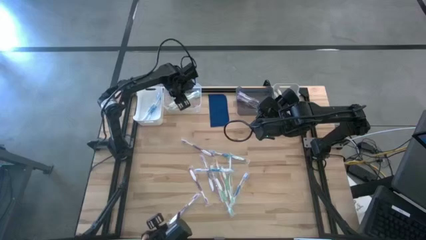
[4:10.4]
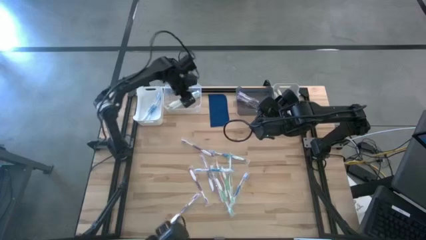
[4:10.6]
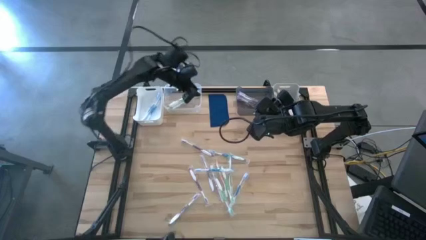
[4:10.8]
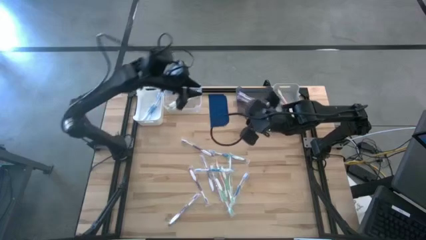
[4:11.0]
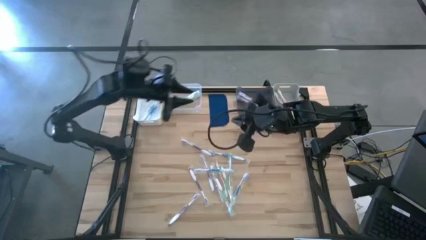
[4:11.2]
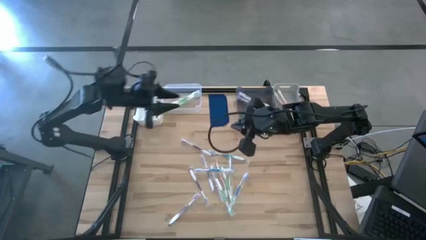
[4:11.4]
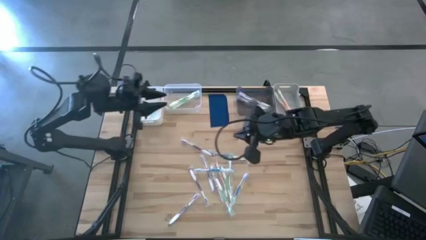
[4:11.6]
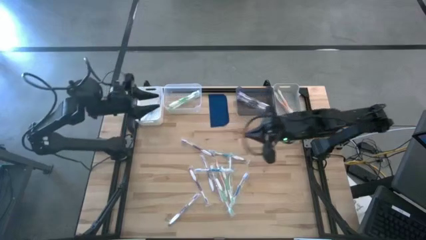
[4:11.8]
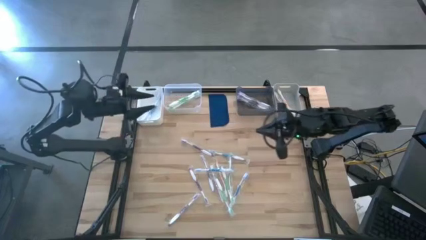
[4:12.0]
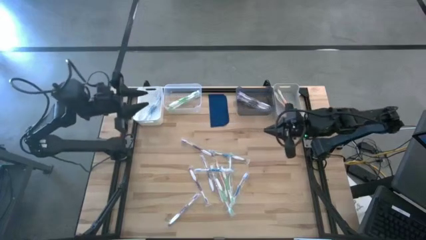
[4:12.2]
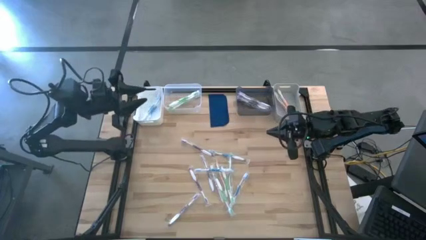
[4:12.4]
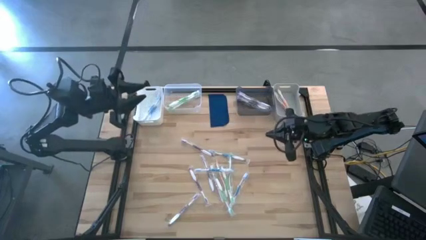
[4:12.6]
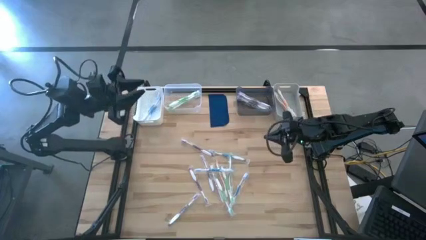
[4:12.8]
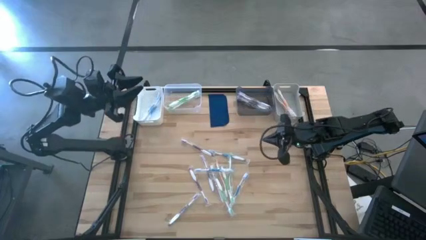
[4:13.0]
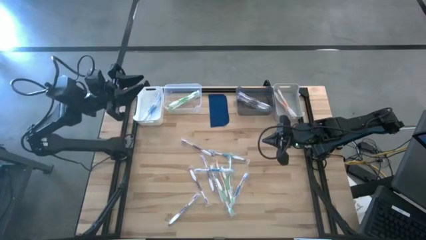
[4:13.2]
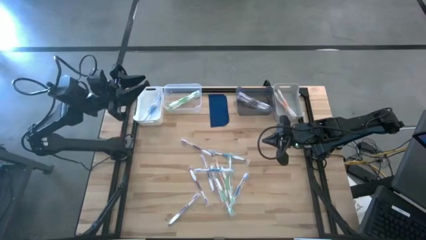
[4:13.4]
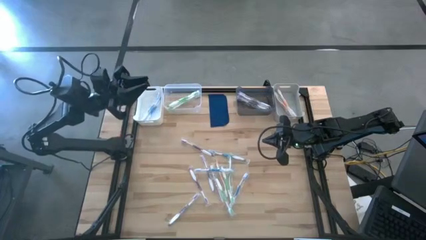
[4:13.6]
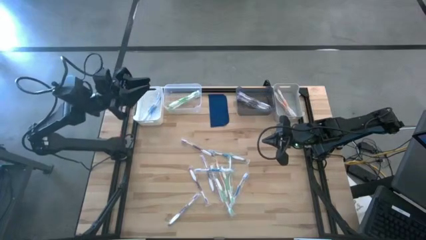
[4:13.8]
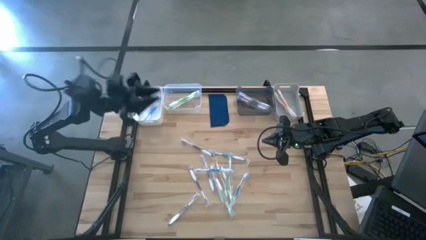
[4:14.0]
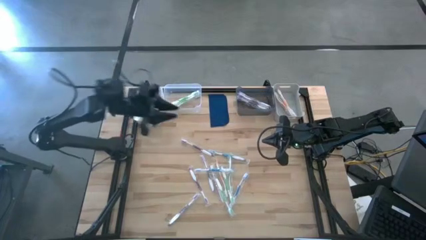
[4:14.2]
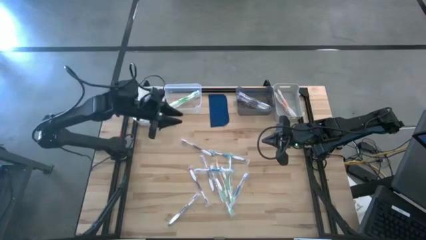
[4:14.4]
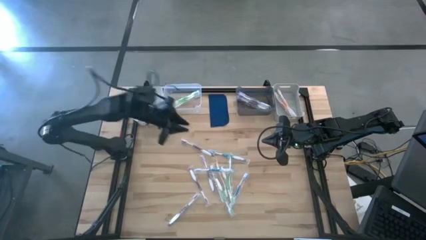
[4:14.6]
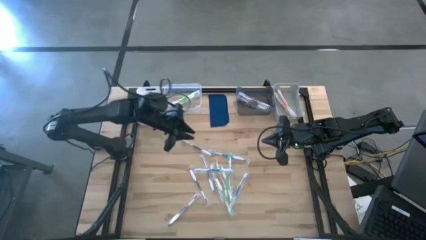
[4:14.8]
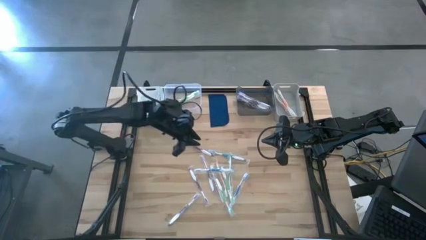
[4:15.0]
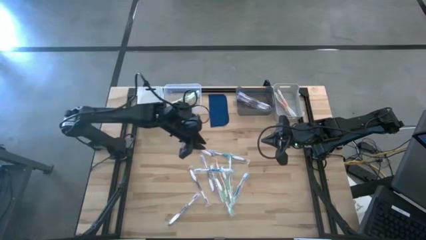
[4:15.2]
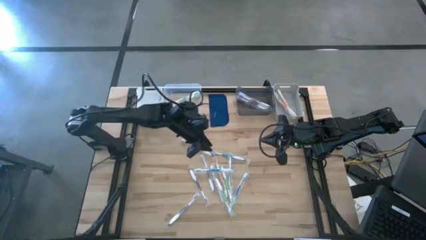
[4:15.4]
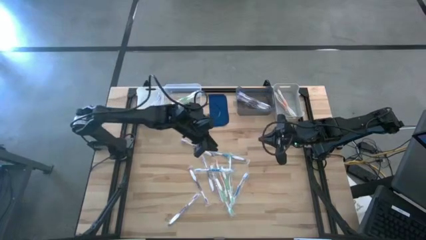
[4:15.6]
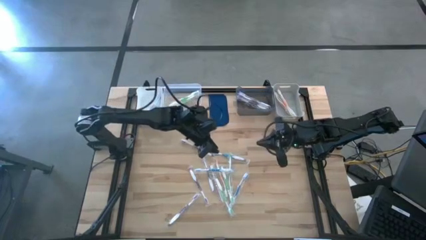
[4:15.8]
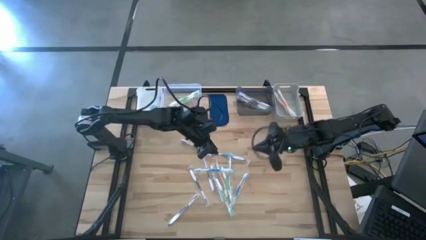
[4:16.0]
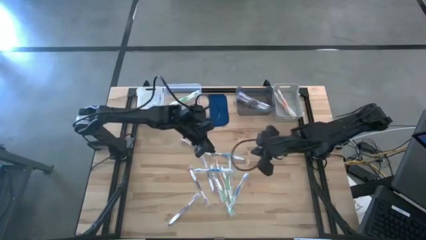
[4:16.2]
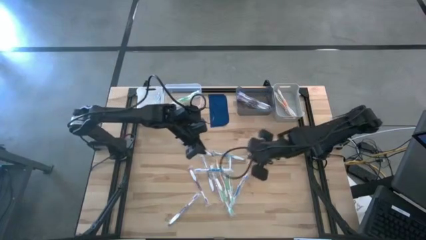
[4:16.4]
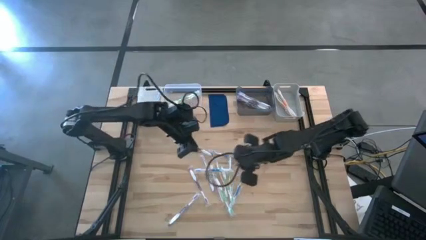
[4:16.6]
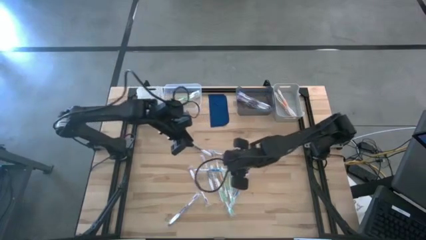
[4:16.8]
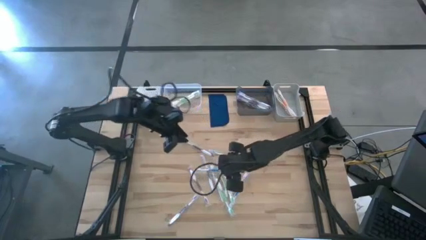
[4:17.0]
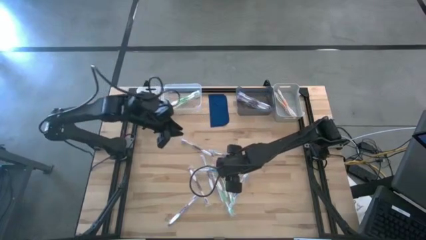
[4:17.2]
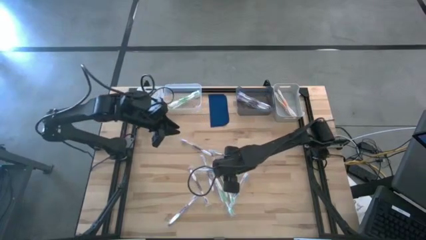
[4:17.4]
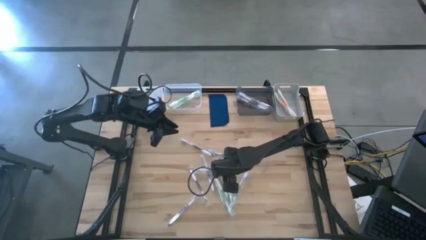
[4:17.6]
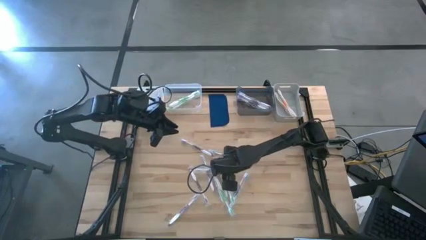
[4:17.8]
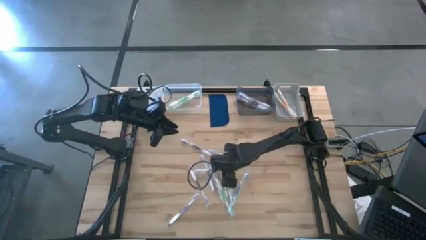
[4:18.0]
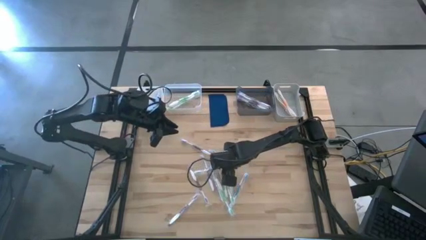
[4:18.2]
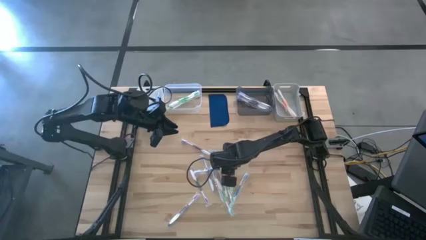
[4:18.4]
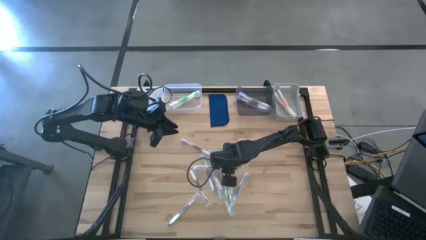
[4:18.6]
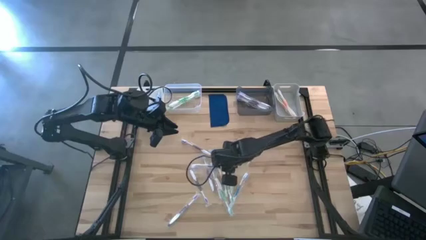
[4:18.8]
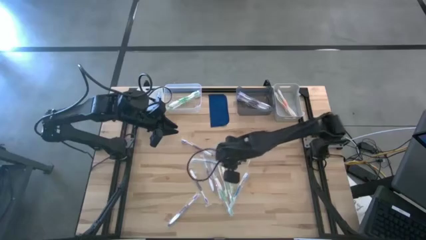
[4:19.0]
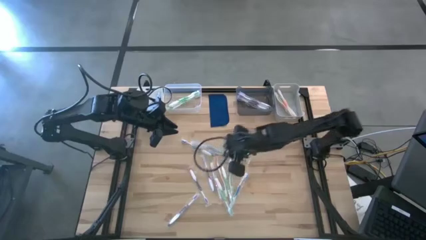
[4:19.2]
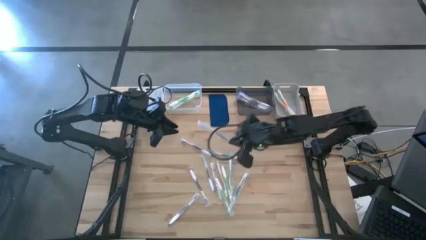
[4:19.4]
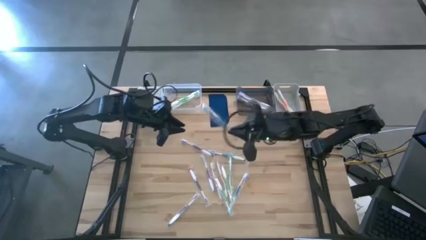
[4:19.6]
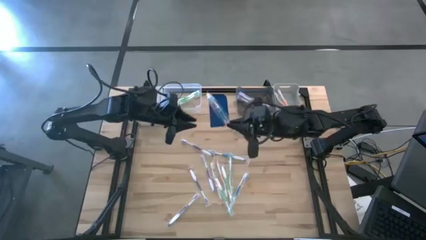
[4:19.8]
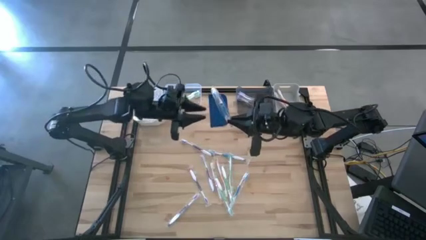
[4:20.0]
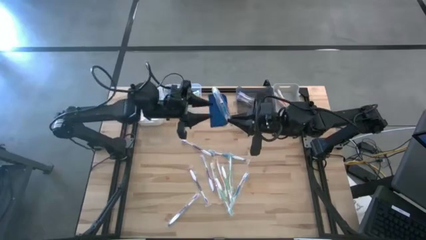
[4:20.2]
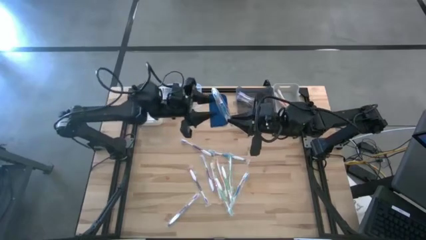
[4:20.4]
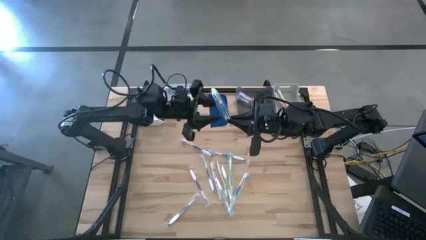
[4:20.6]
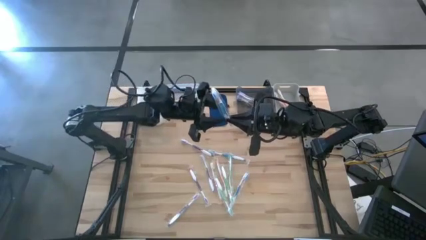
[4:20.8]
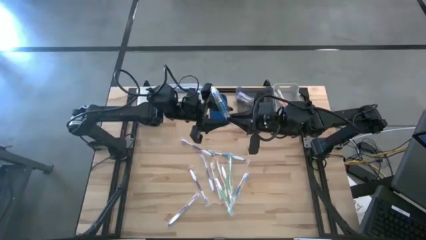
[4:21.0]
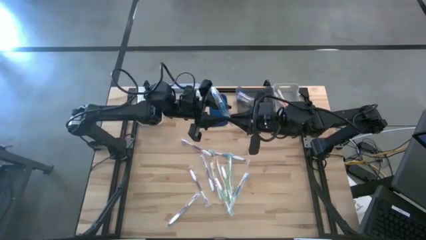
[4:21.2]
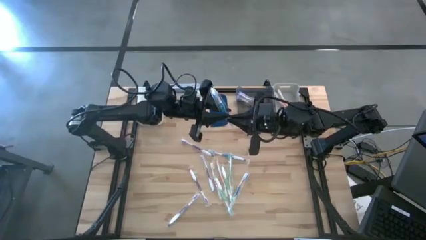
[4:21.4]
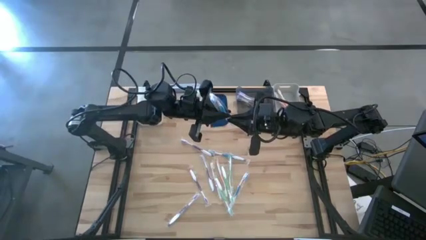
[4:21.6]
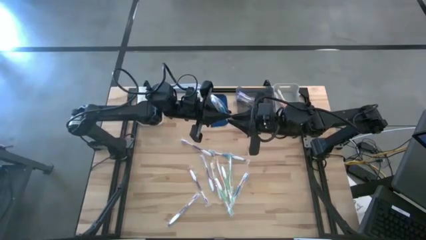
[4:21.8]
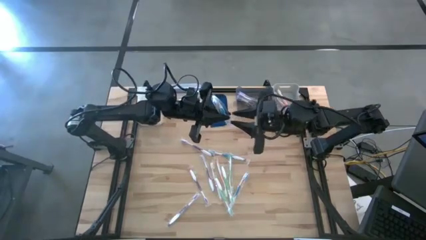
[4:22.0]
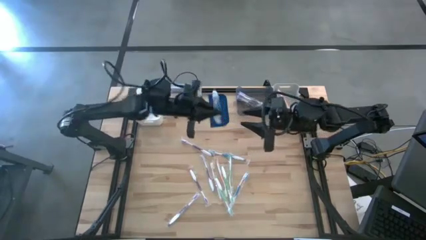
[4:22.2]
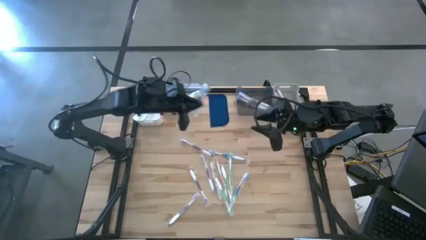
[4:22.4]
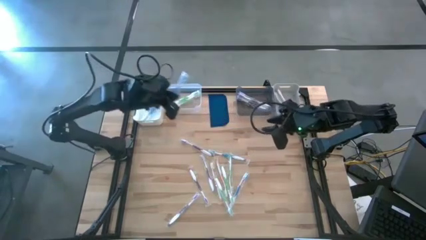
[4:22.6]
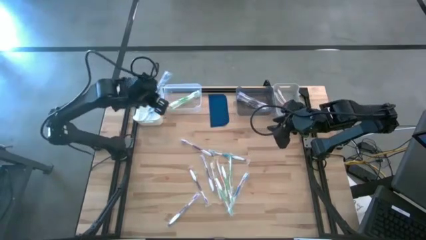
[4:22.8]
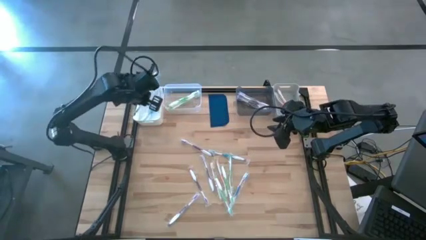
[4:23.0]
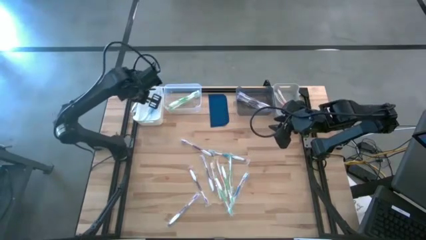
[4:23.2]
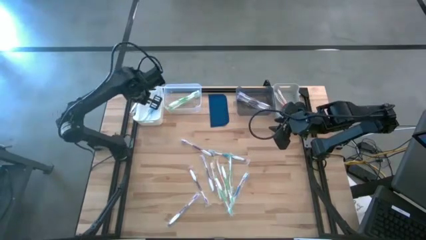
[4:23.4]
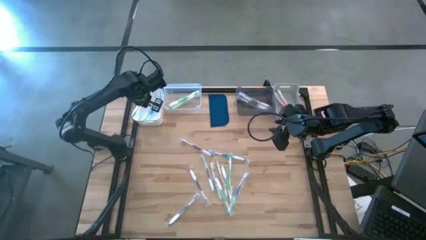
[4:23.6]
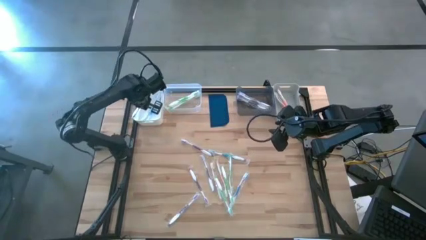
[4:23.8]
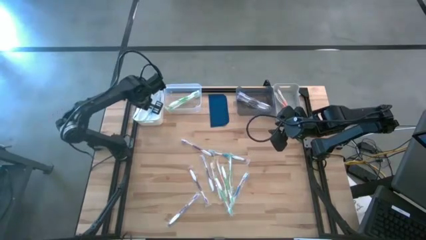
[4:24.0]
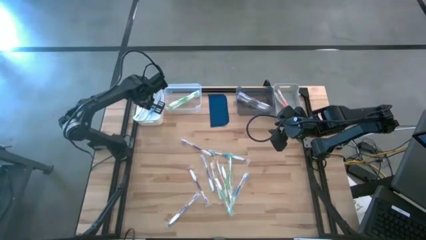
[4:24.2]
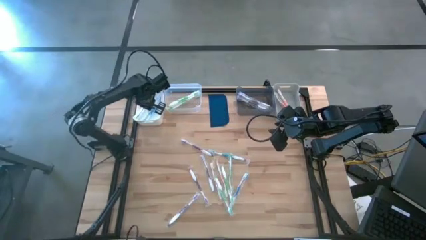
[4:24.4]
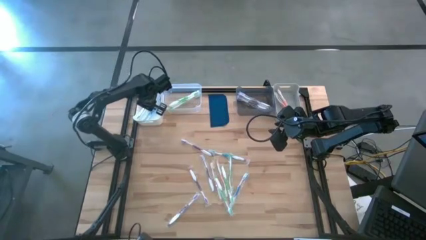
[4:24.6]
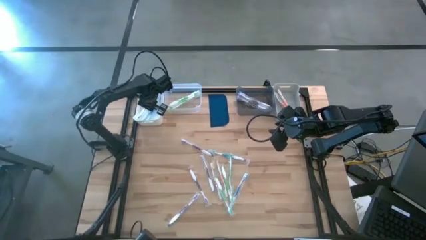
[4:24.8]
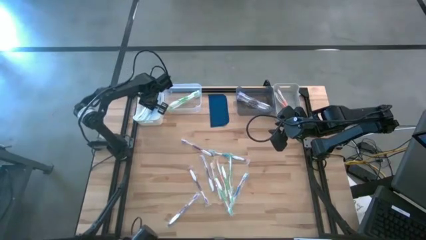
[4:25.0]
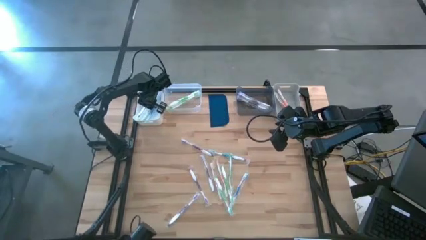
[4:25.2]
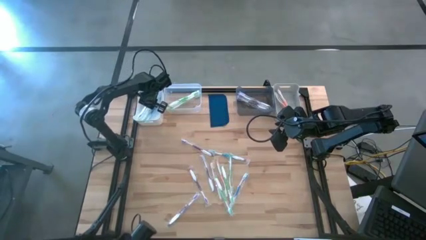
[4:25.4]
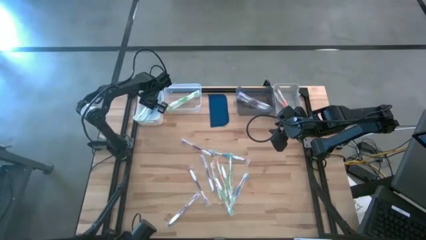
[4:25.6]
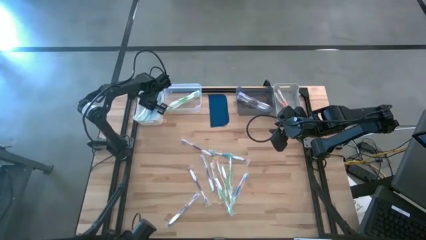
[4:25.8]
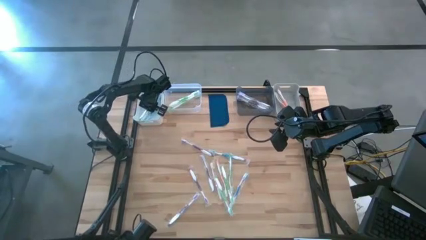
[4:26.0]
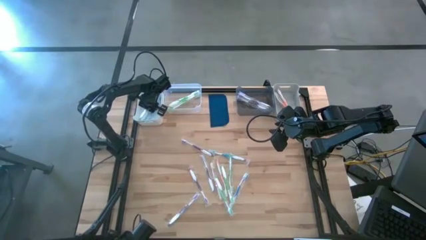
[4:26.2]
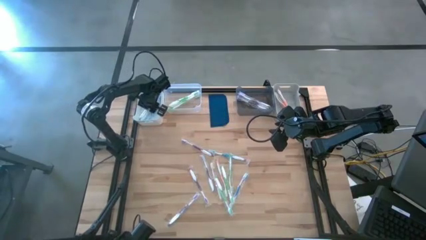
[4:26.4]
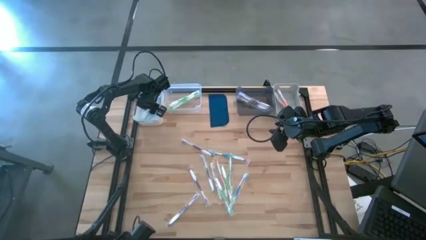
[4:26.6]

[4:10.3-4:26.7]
Task: Pick & Place Toothbrushes
Put the middle blue toothbrush into the white bin

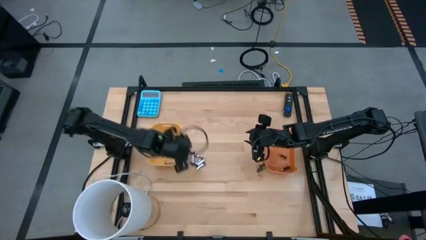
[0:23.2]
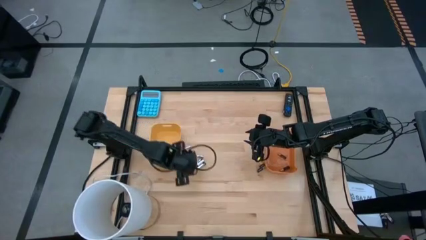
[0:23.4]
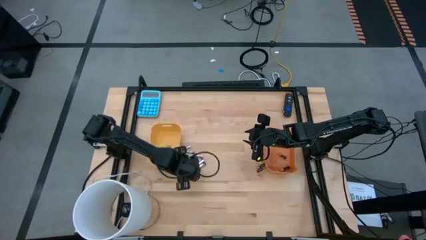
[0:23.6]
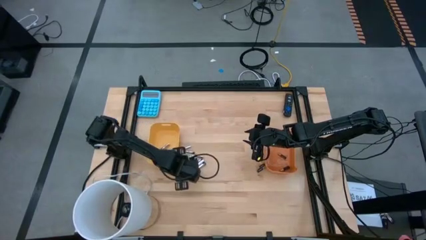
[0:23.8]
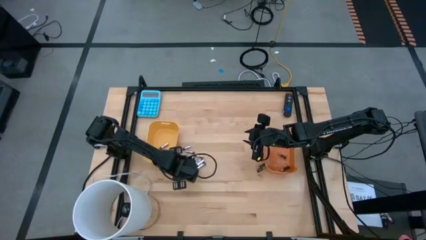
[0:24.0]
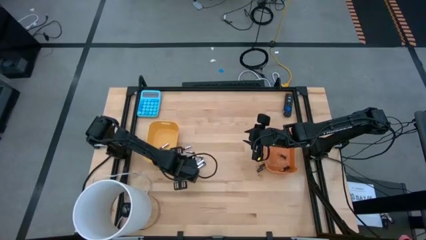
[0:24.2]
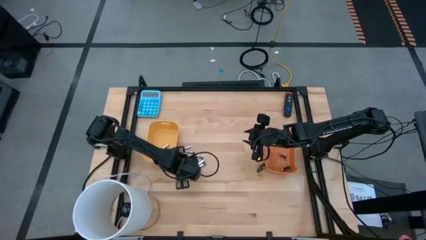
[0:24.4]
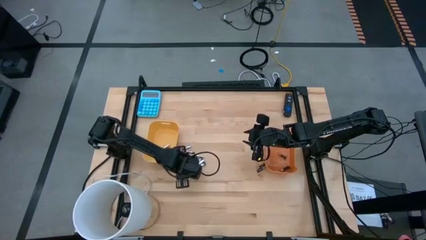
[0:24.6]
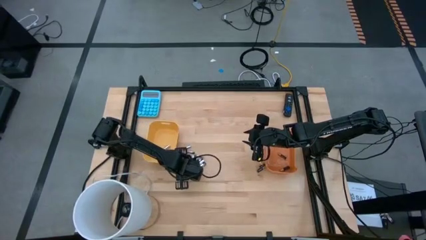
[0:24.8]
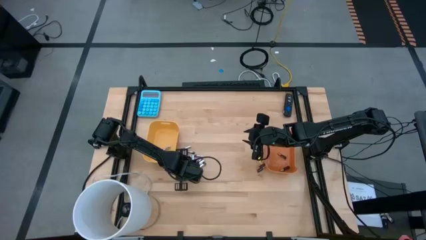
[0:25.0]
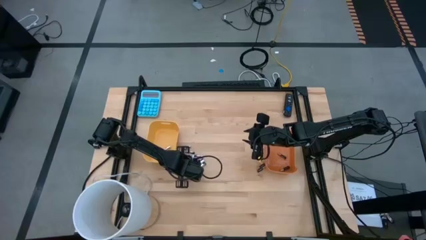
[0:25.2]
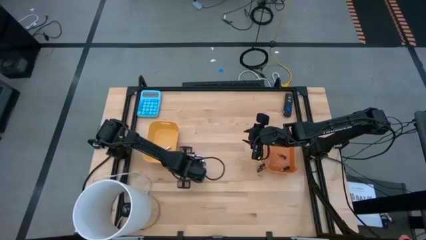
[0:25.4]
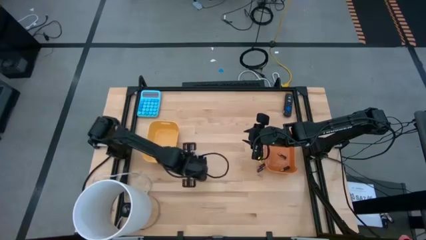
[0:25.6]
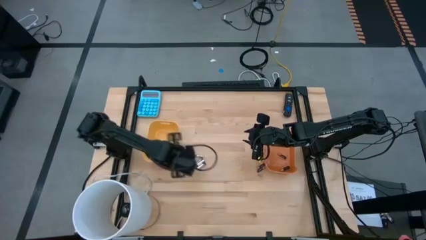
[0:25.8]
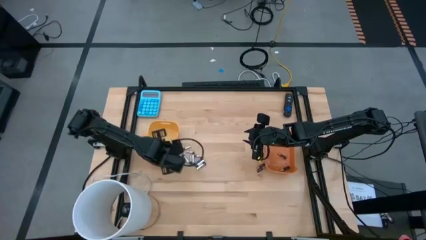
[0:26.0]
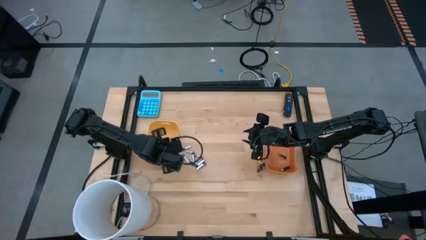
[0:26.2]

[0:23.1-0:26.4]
Task: Sort batteries
Put the silver battery into the yellow bin
